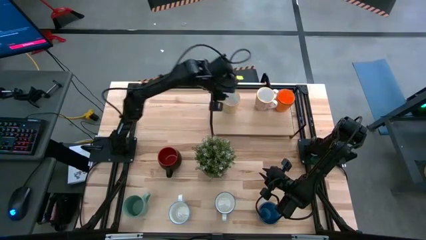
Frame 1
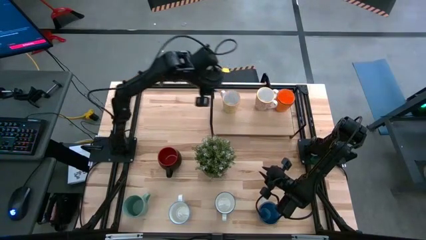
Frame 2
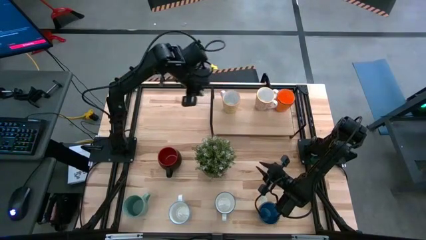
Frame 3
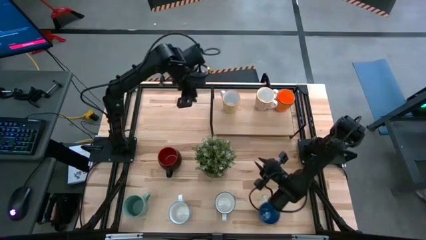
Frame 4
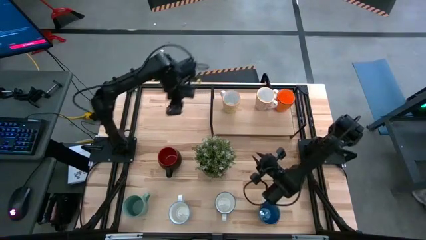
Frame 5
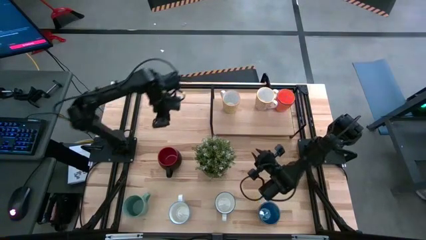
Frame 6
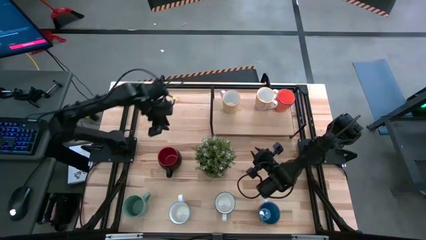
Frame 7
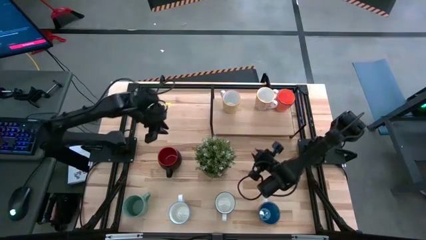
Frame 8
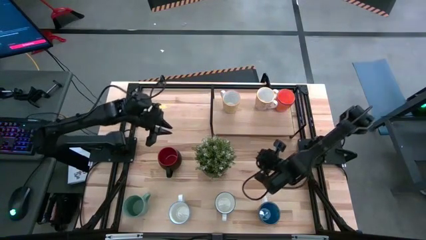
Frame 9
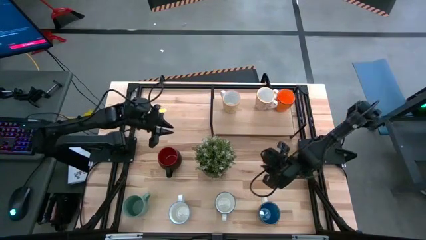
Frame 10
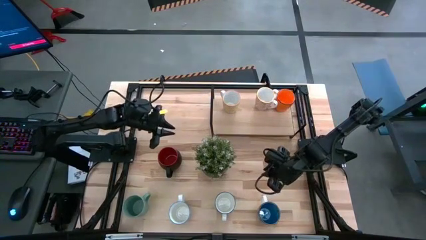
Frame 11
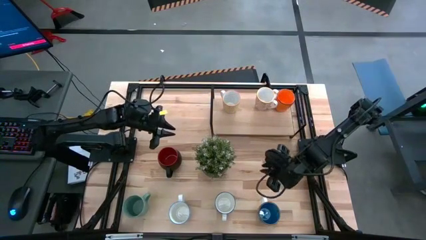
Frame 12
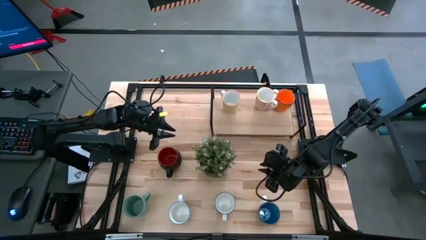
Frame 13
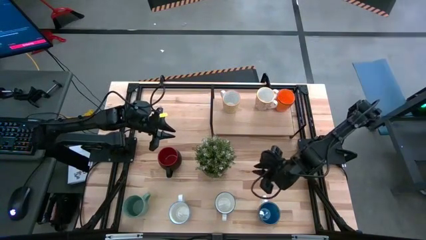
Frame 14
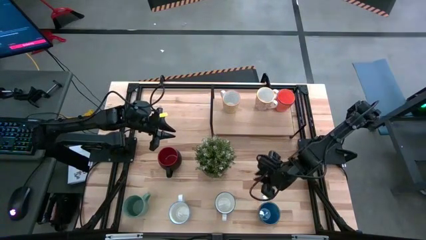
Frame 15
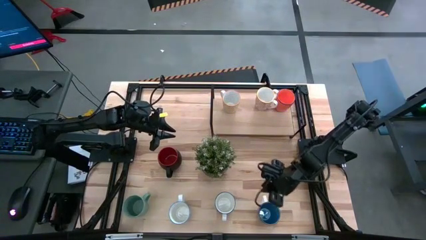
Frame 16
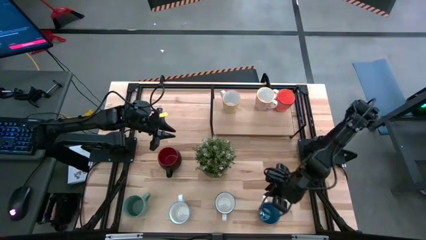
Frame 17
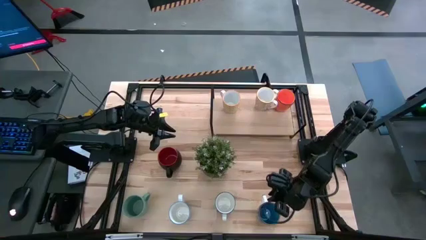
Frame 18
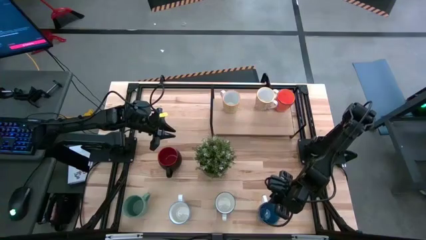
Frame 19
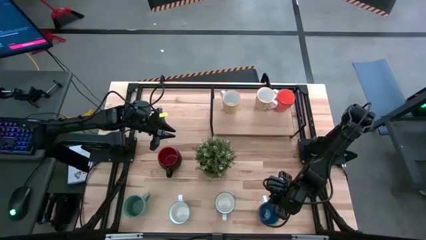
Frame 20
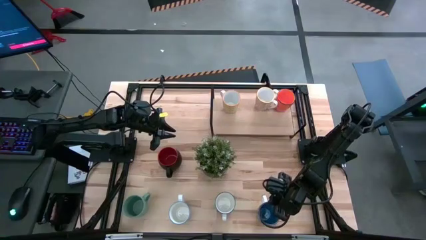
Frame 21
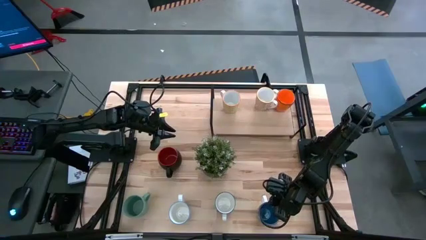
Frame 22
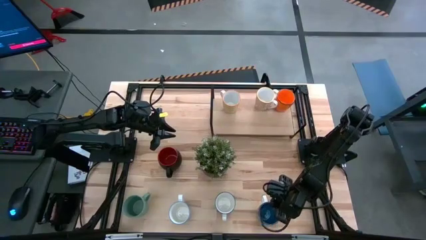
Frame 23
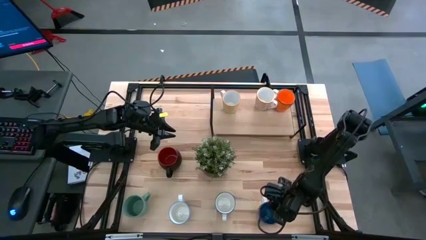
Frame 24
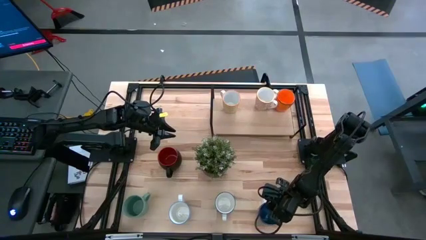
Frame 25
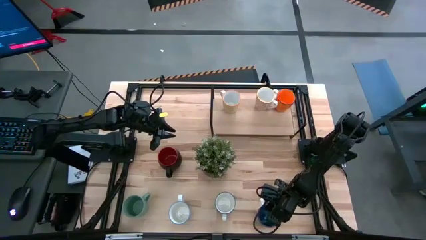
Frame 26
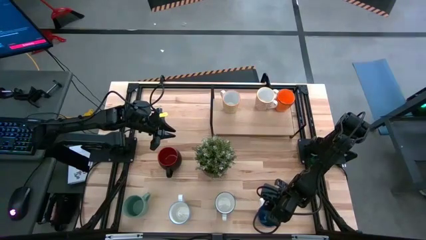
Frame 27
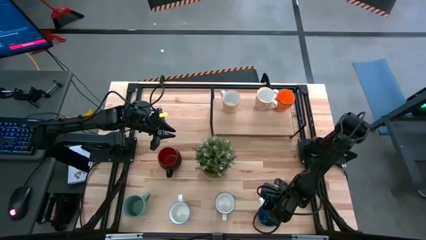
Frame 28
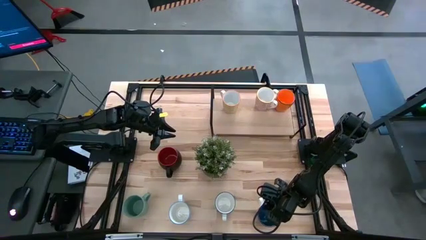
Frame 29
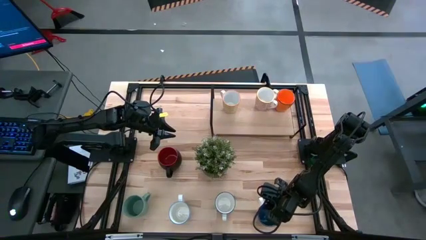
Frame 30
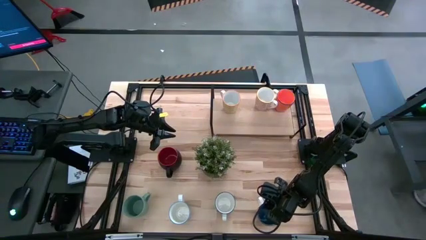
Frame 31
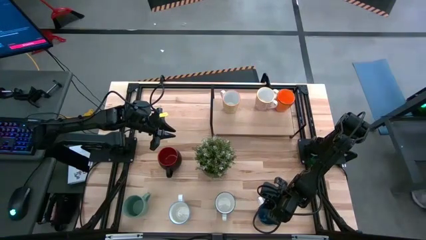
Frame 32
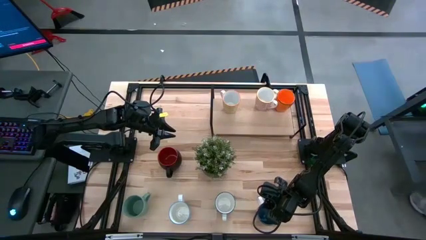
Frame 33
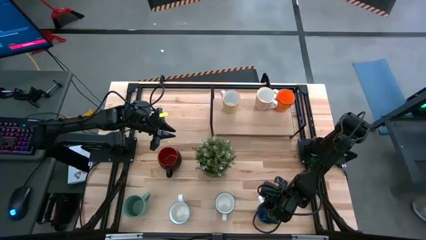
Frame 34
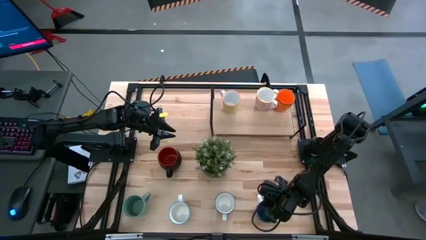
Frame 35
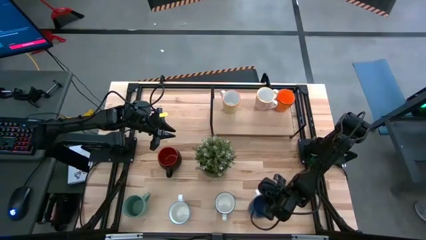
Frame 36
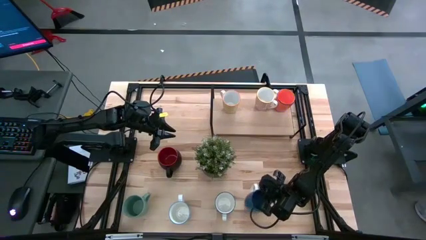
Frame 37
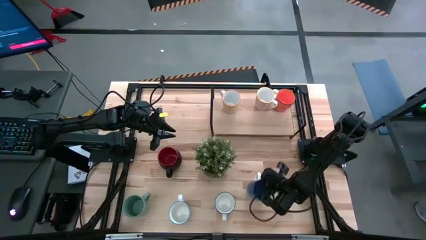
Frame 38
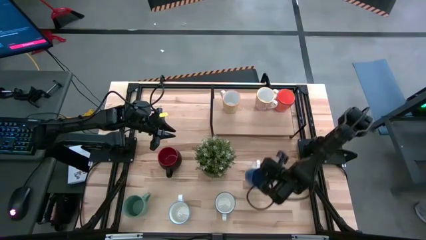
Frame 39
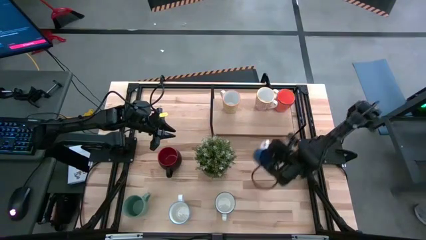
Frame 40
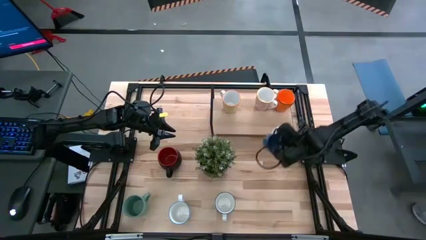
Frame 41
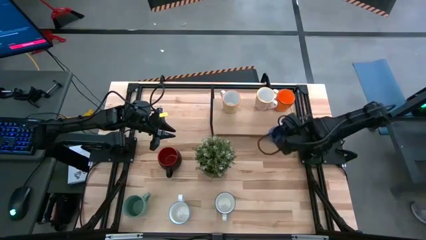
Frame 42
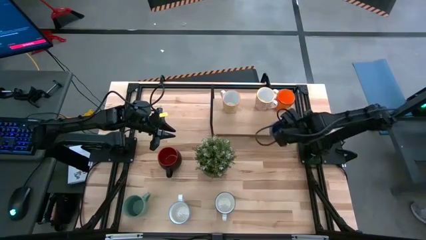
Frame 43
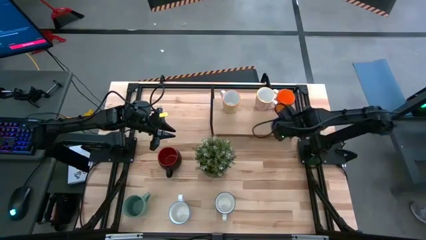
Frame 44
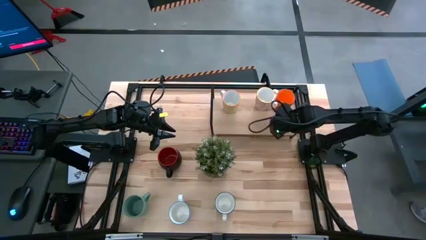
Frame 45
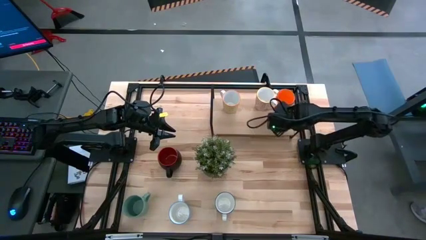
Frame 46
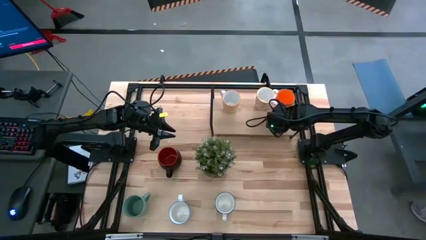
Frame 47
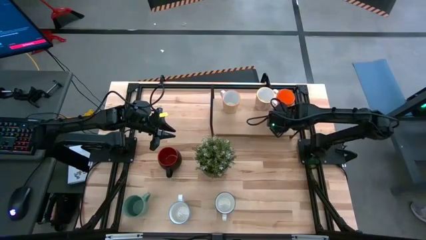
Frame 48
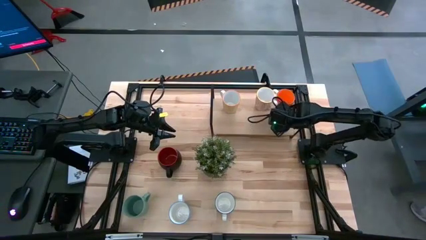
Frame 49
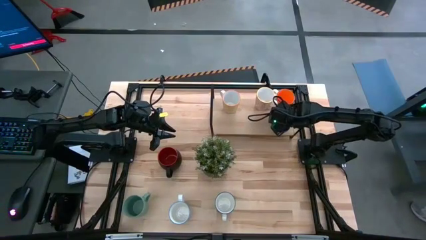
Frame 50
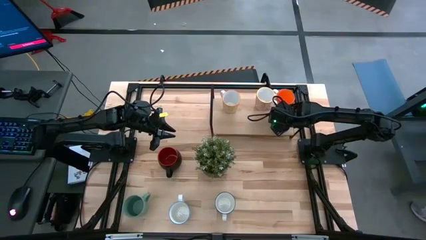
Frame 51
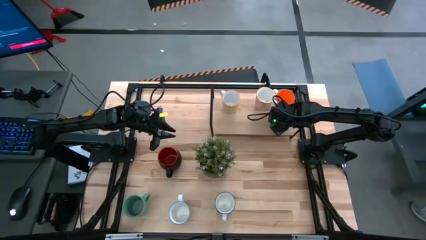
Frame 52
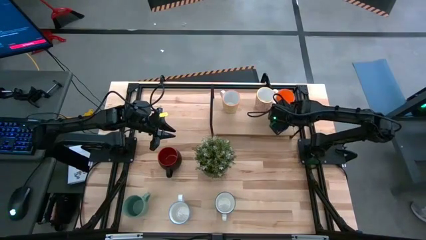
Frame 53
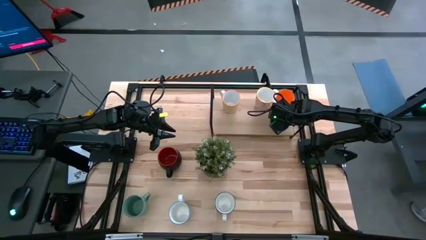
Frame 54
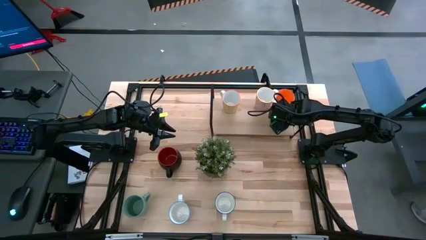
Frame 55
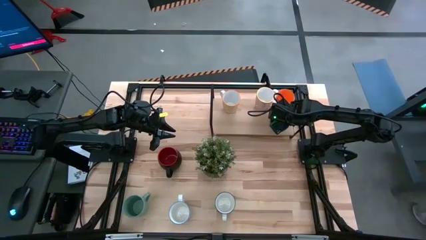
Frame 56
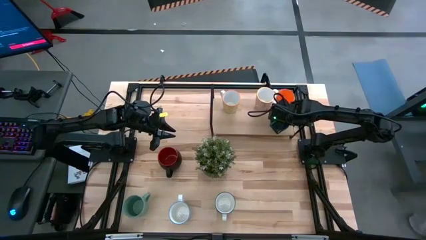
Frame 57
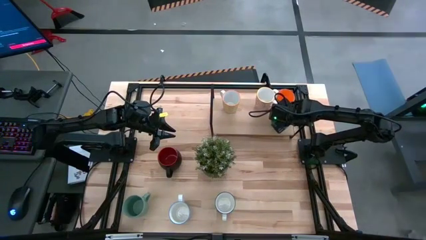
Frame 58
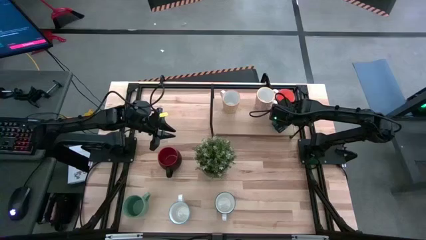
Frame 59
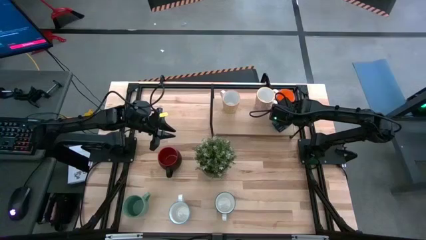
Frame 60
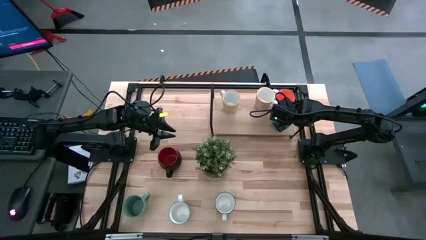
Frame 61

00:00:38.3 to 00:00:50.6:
Task: Place coffee mugs
Put the blue mug on the shelf
